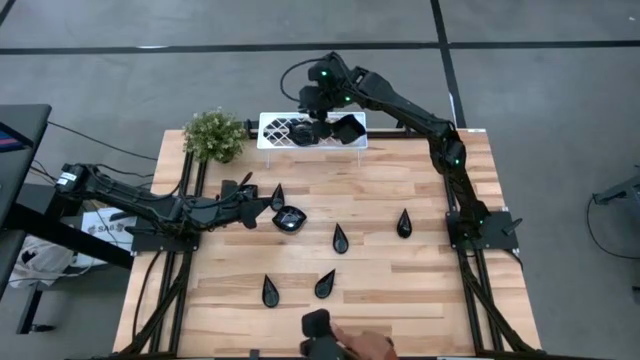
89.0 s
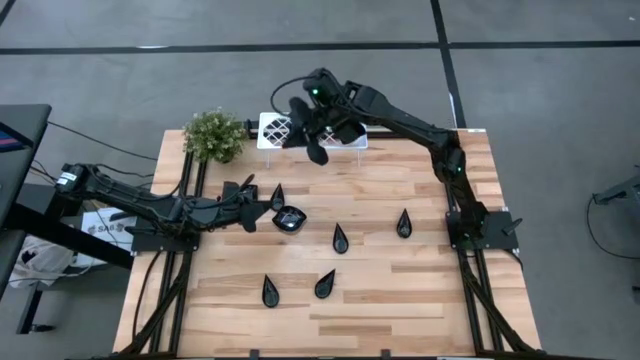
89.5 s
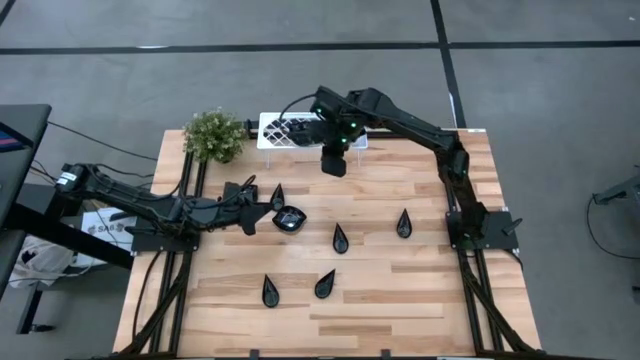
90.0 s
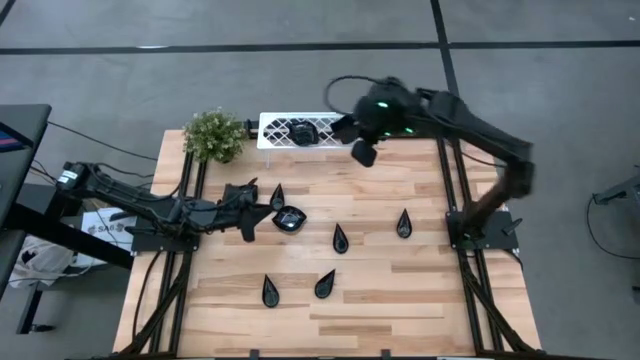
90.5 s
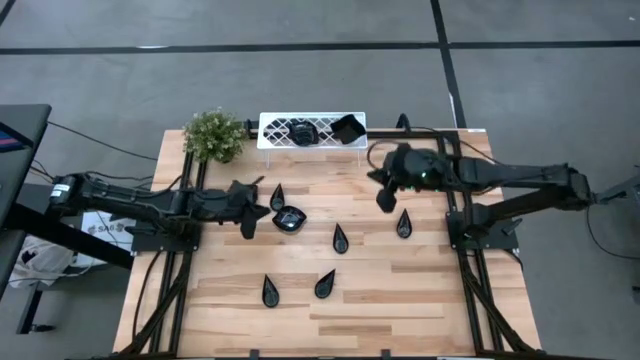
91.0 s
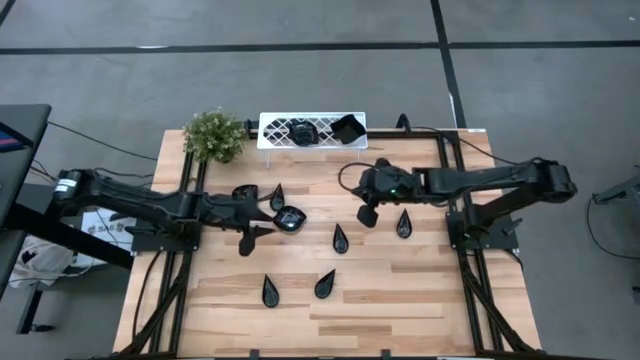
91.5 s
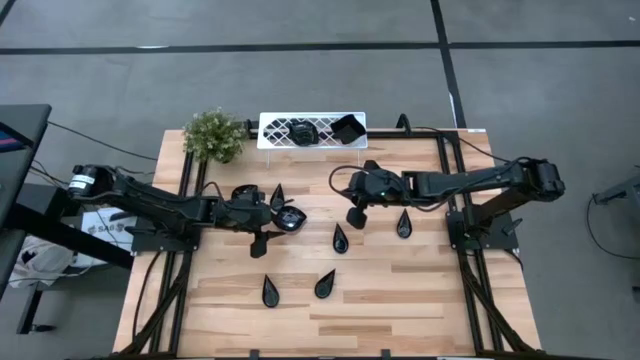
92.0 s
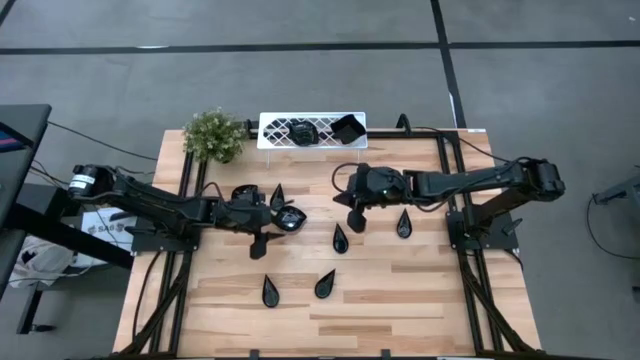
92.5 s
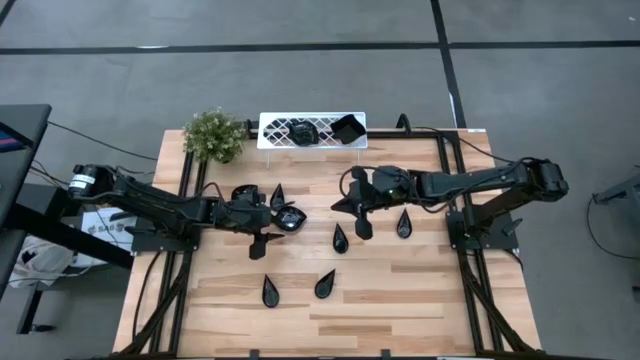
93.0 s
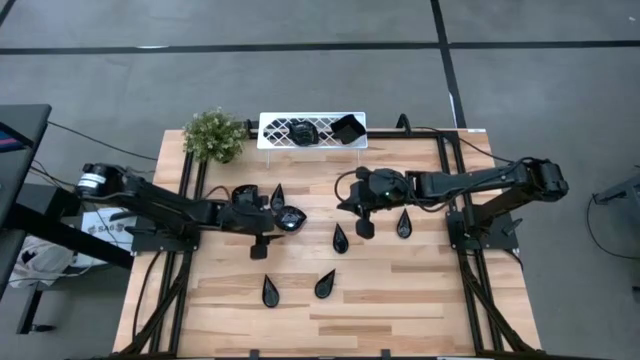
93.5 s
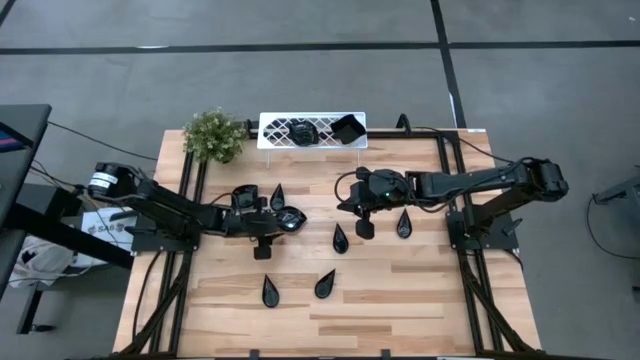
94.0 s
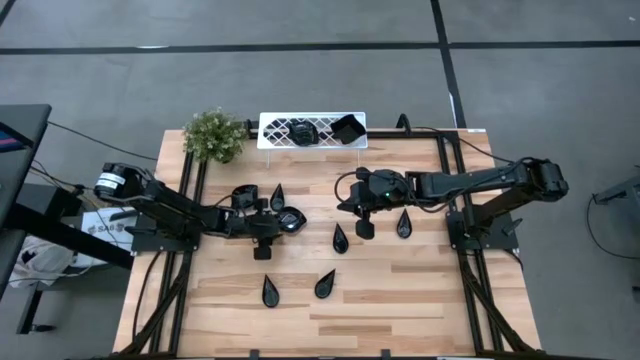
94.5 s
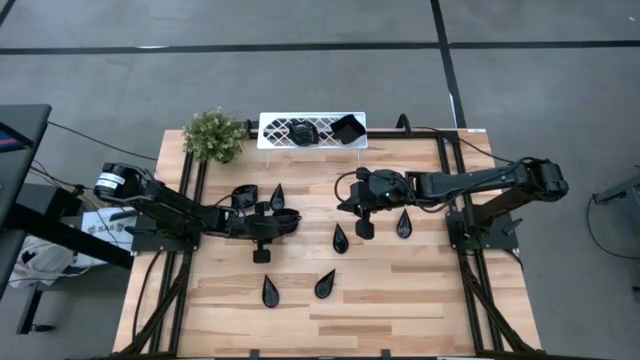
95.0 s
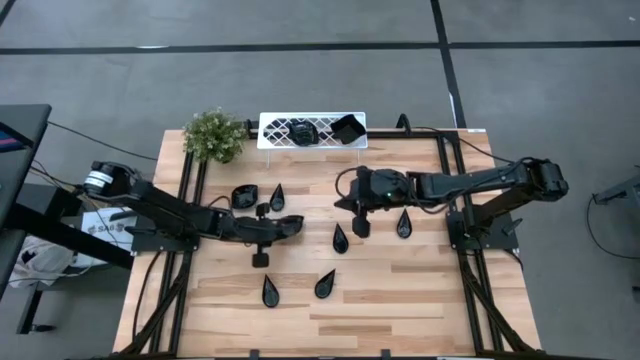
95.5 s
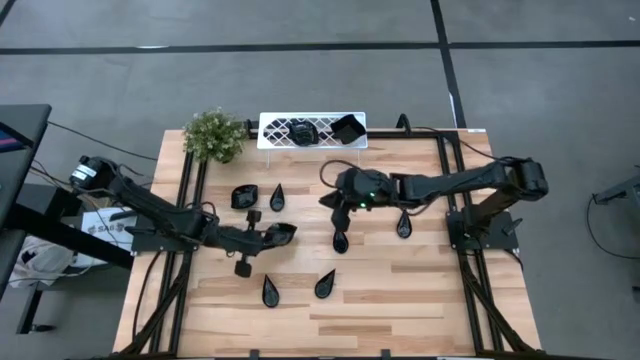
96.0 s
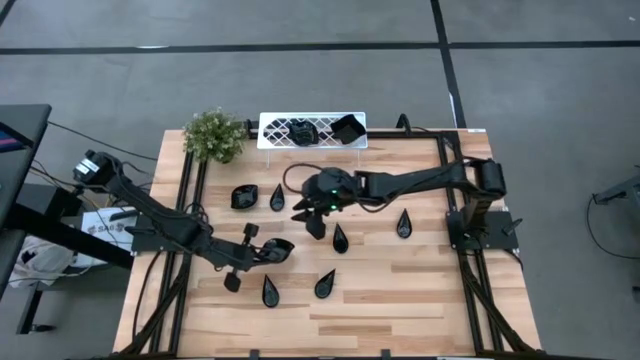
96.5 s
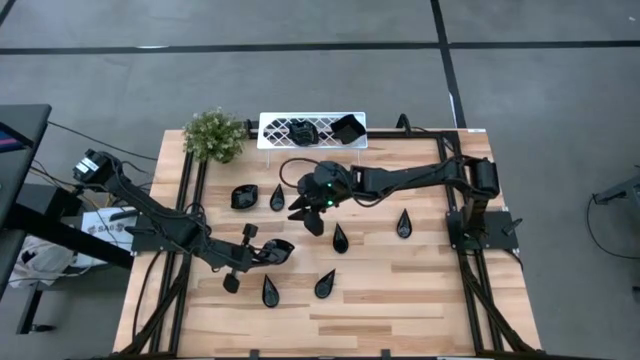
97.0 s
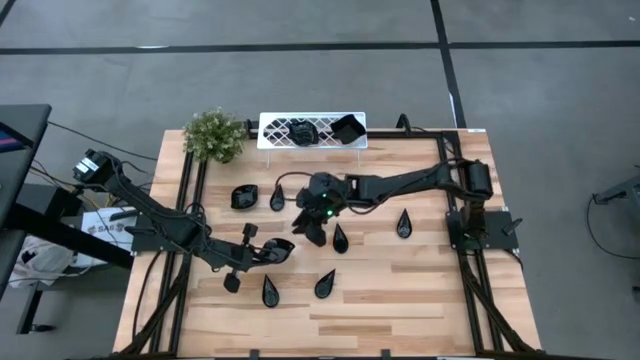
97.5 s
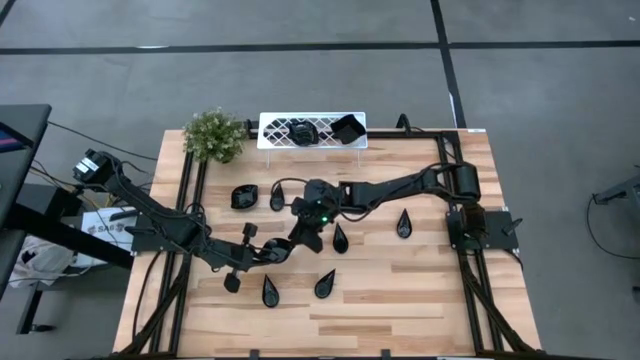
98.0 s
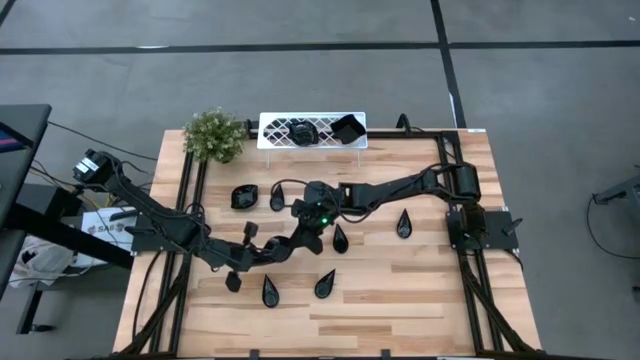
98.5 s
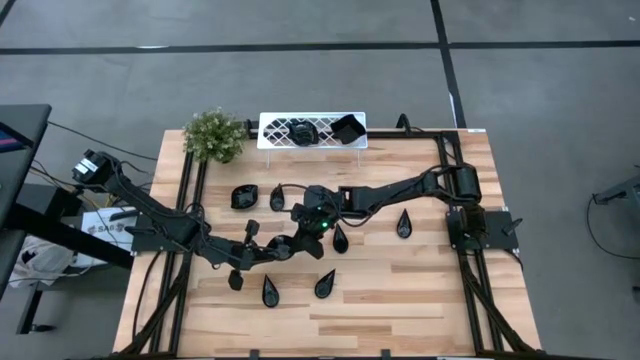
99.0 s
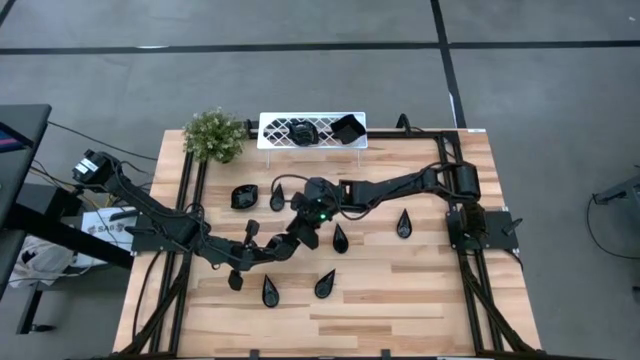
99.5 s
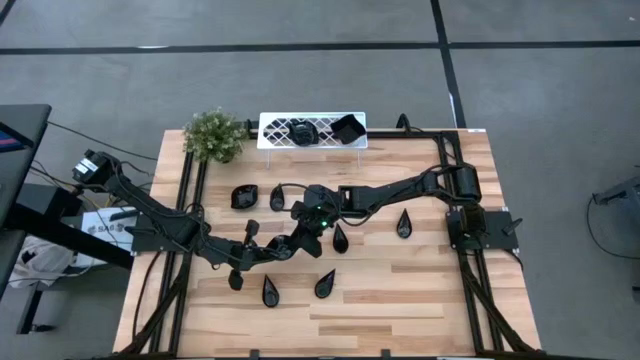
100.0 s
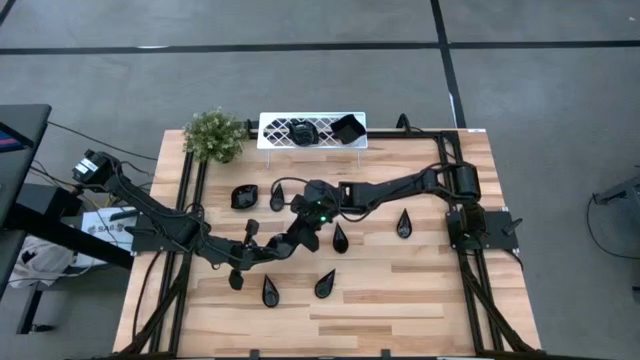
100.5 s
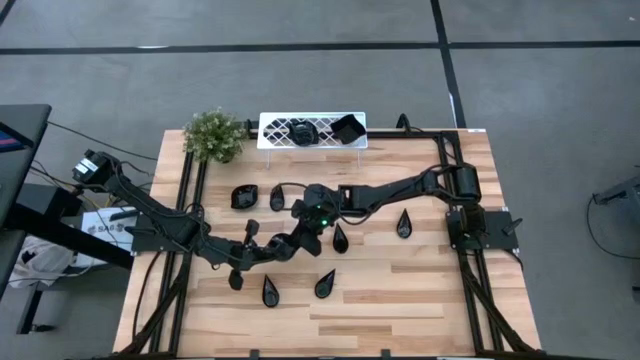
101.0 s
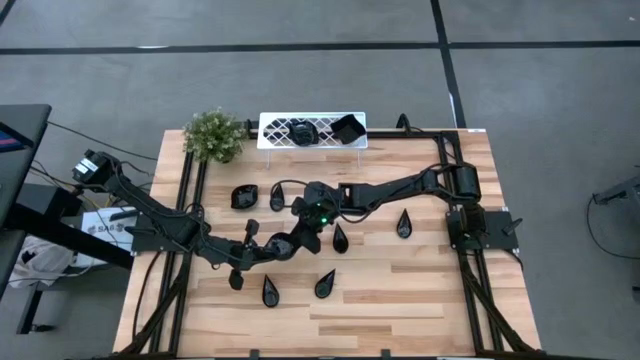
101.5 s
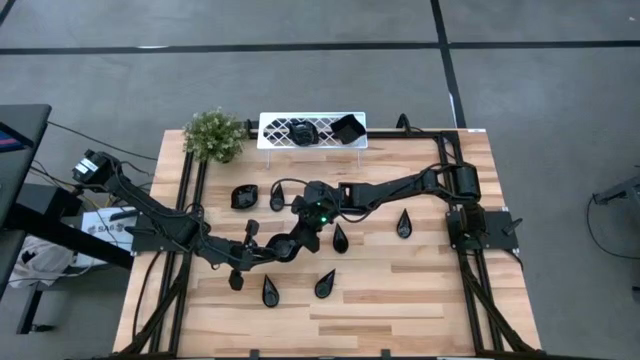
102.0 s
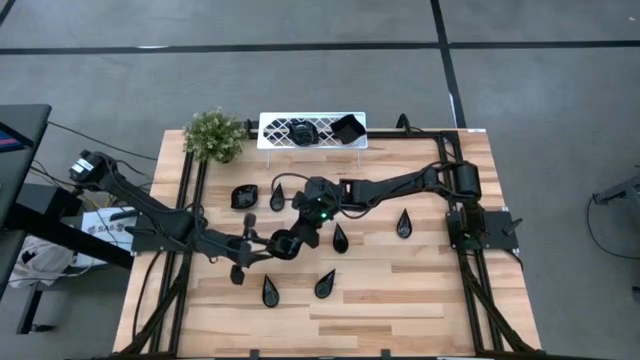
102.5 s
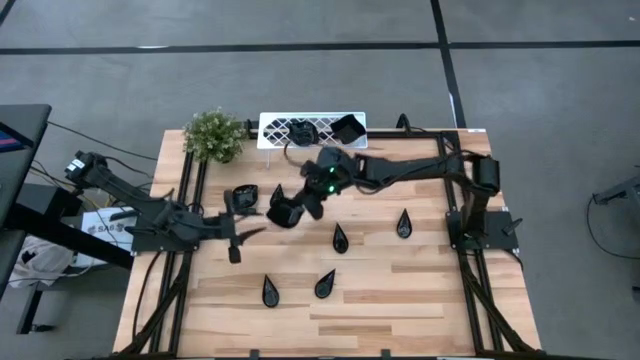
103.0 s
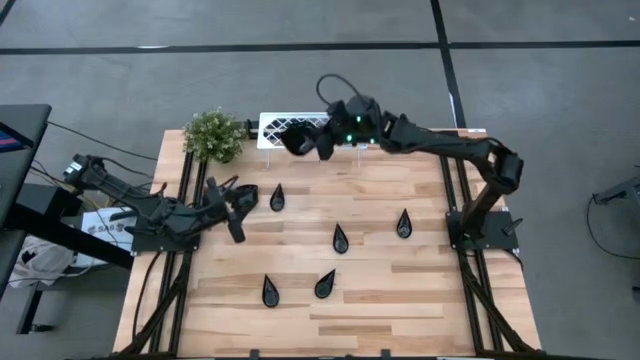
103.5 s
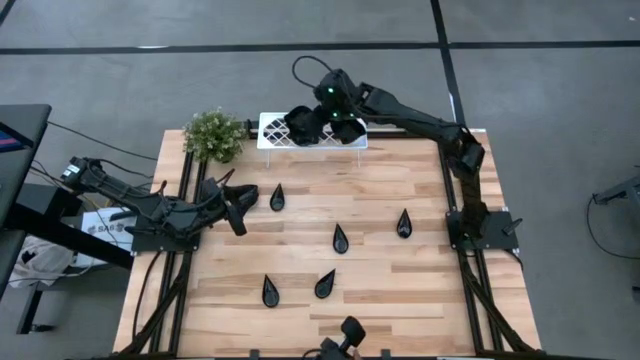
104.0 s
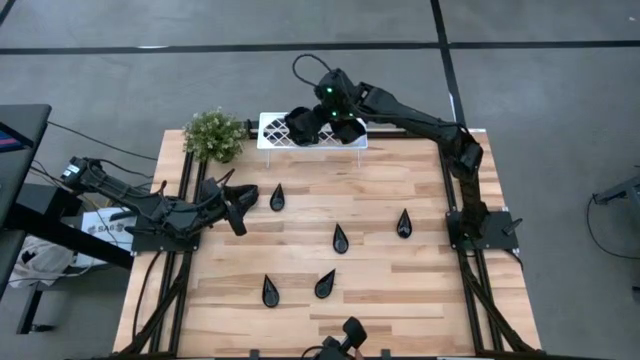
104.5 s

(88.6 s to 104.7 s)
Task: Pick & Place Mini shaped plates
Stack the right leaf shaped plate on the top of the leaf shaped plates on the shelf

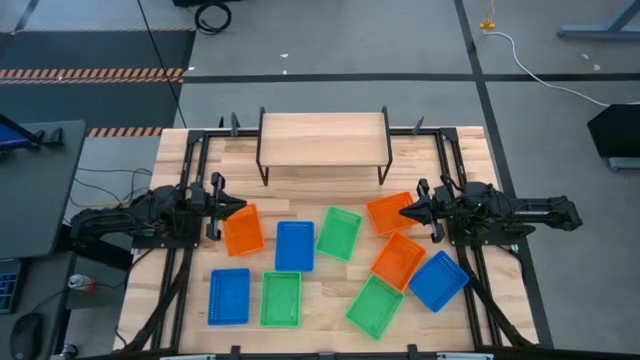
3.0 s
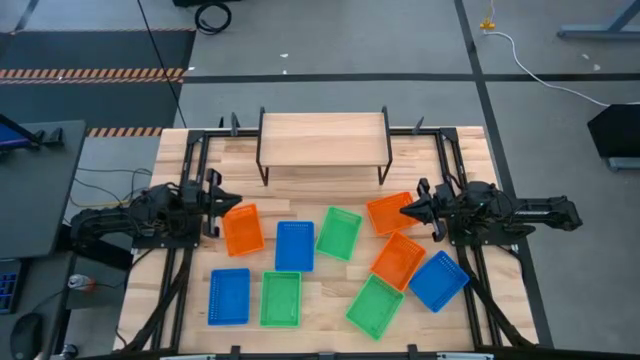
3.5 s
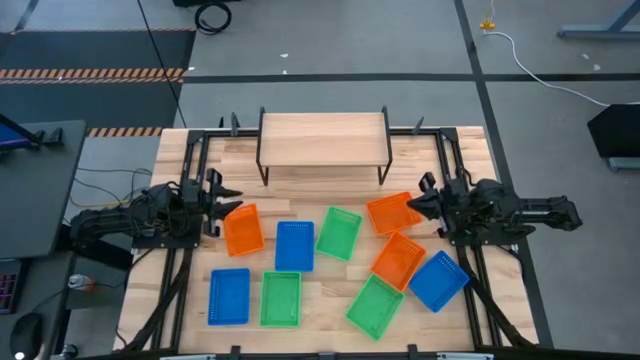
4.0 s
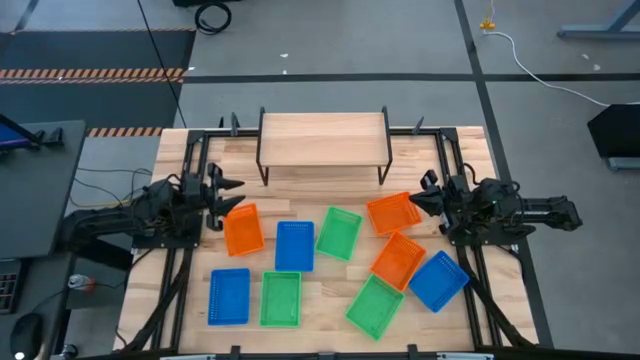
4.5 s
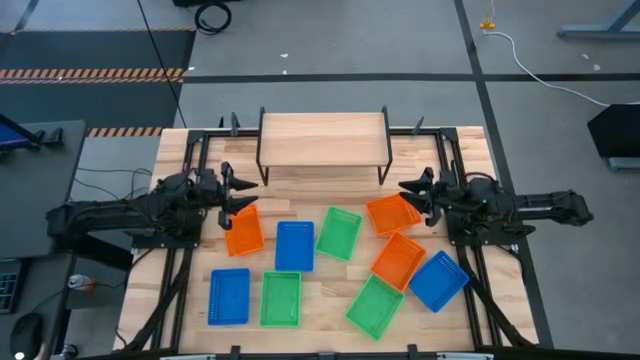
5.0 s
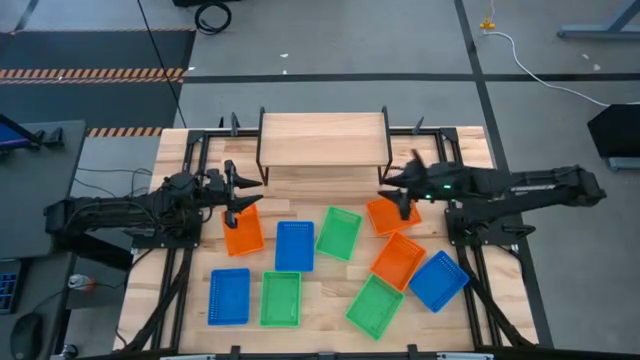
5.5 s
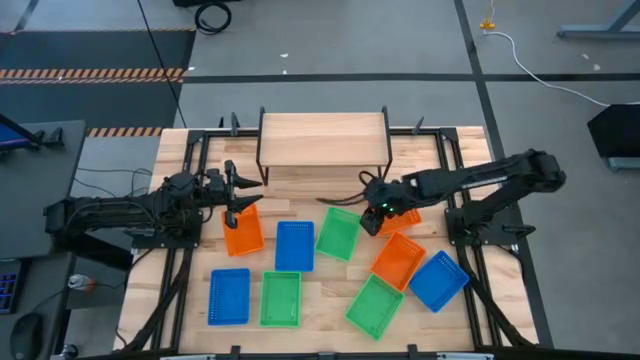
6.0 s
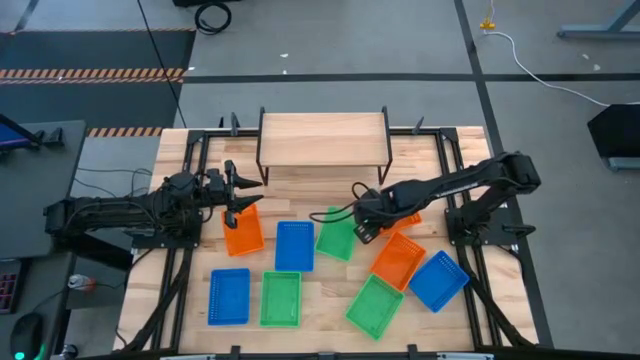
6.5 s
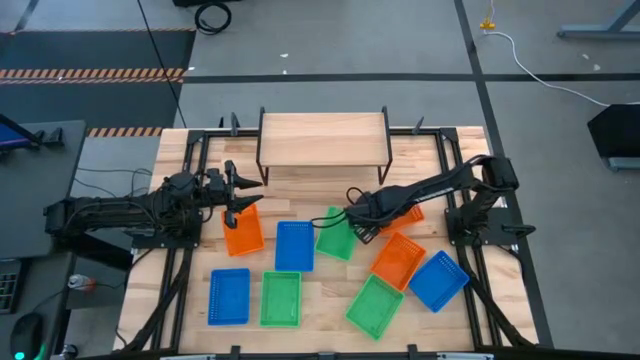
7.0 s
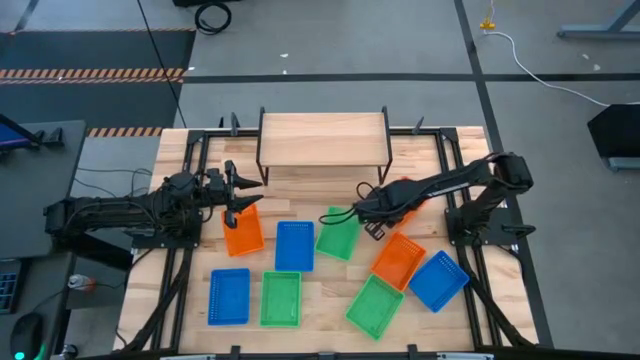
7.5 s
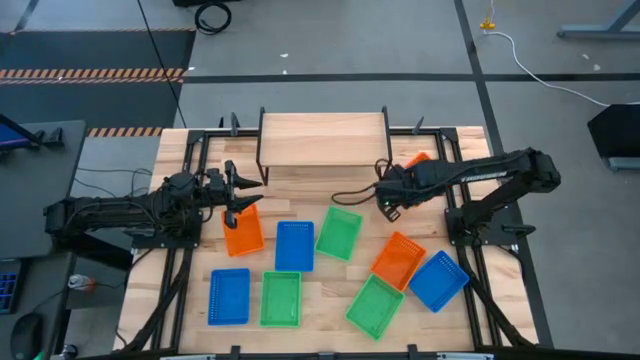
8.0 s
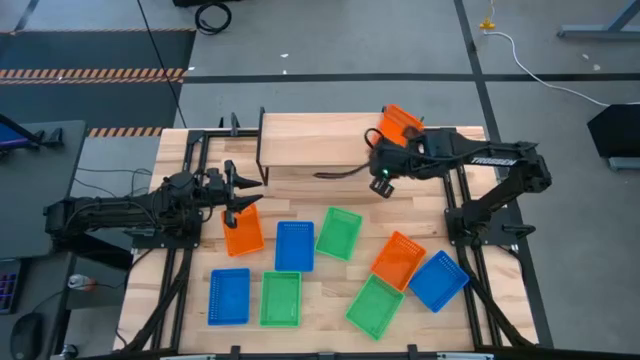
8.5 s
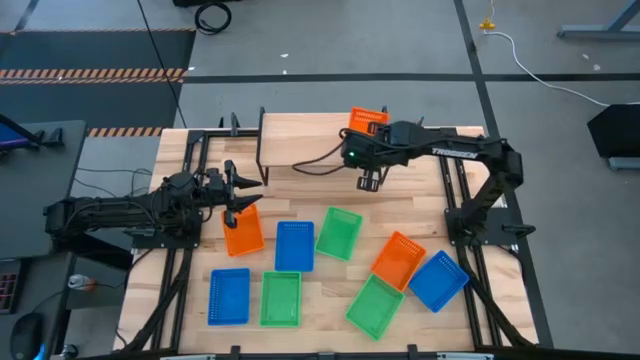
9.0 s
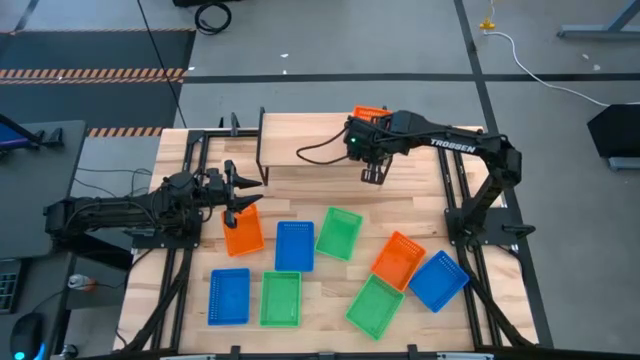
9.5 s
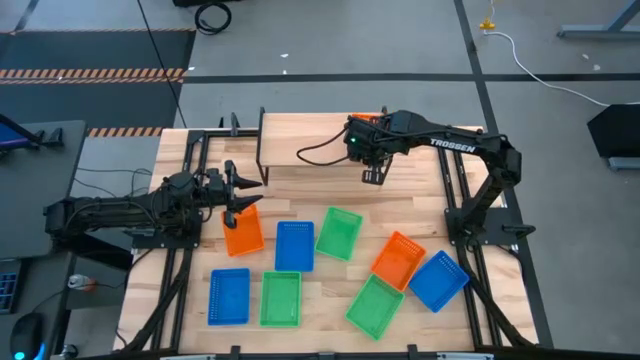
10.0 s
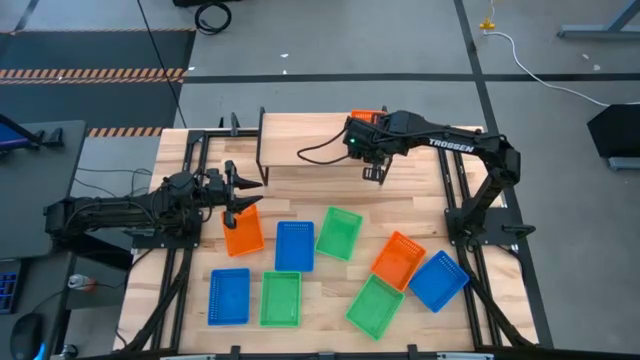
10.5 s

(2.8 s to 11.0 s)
Task: Stack baskets on shelf by color
Put the top right orange bin on the shelf
